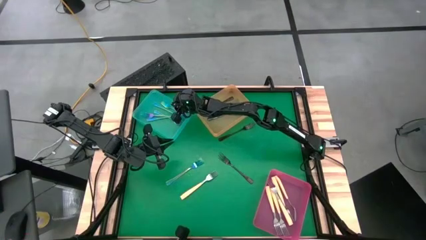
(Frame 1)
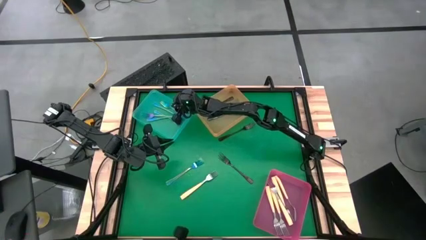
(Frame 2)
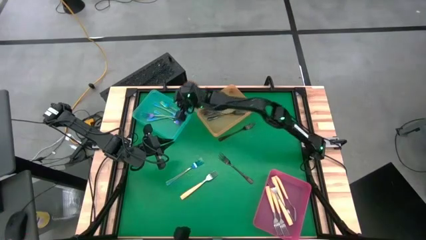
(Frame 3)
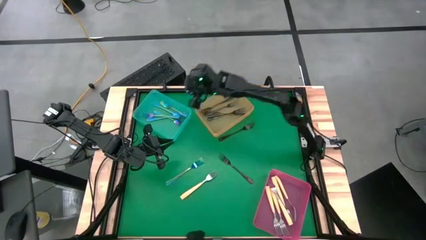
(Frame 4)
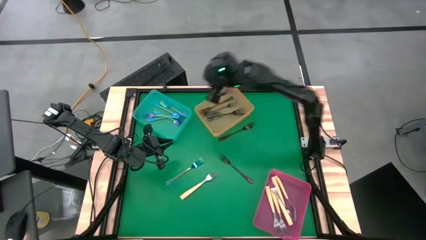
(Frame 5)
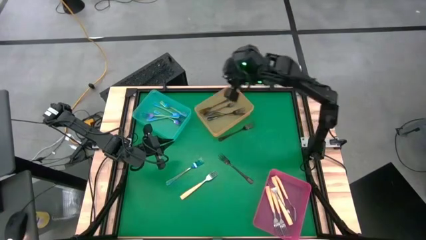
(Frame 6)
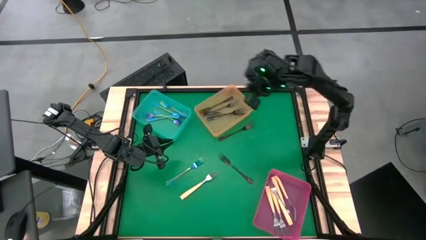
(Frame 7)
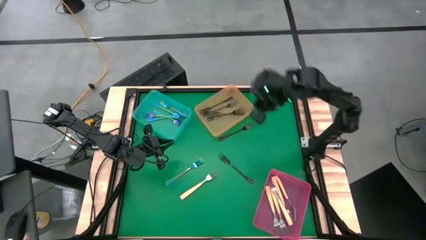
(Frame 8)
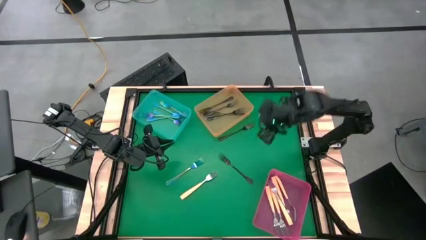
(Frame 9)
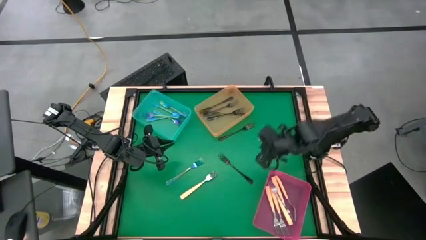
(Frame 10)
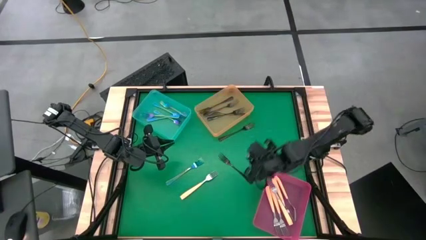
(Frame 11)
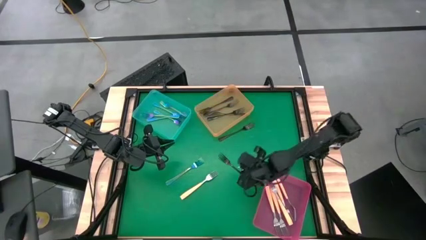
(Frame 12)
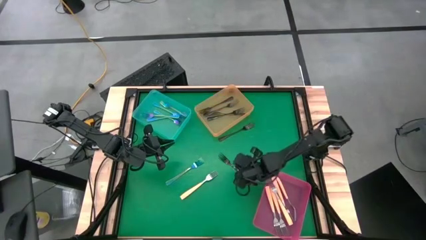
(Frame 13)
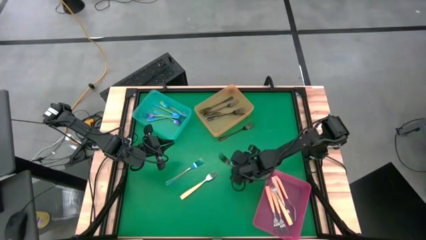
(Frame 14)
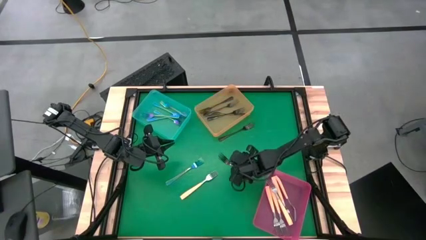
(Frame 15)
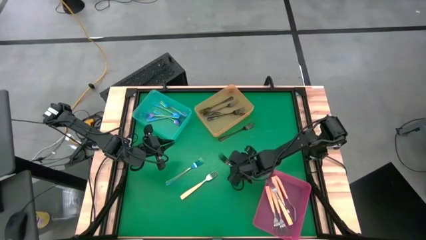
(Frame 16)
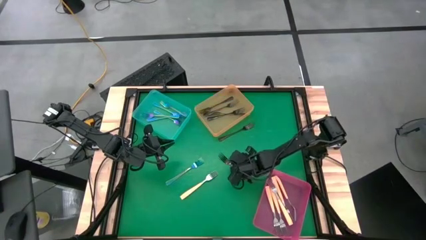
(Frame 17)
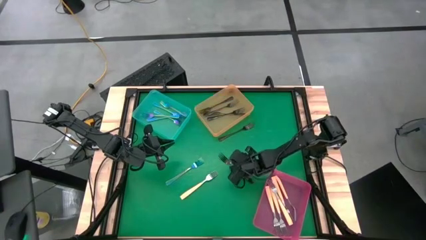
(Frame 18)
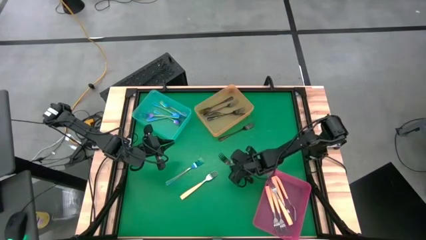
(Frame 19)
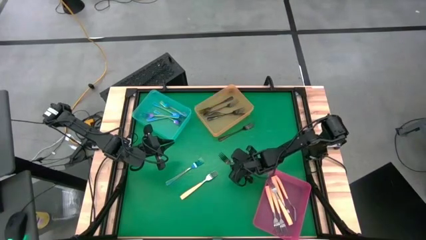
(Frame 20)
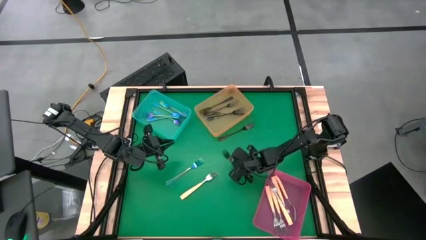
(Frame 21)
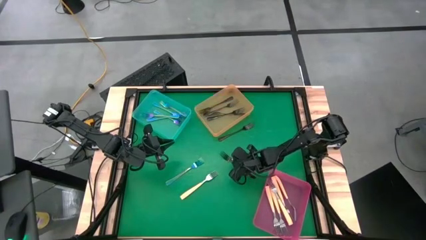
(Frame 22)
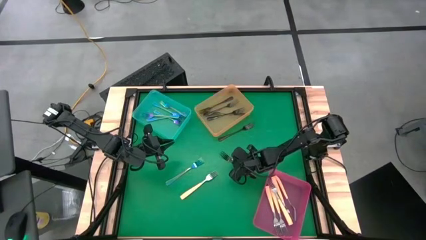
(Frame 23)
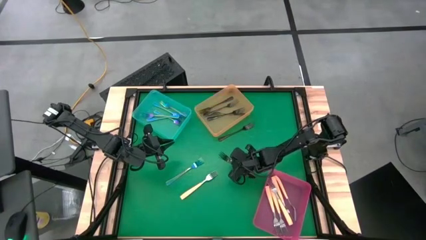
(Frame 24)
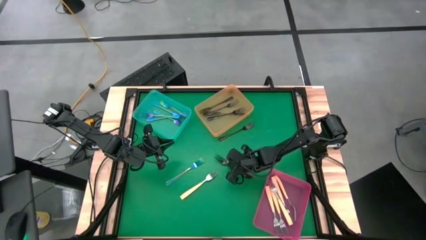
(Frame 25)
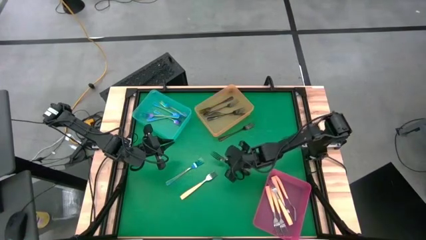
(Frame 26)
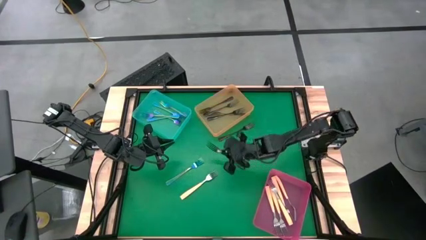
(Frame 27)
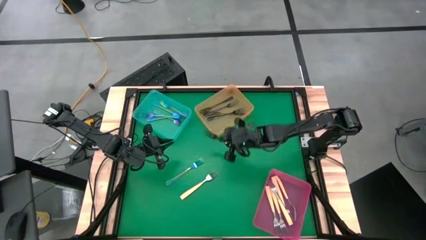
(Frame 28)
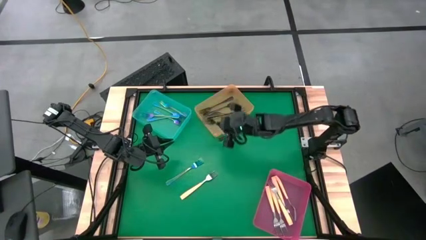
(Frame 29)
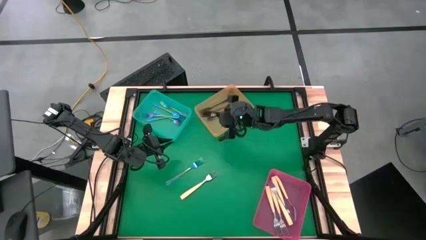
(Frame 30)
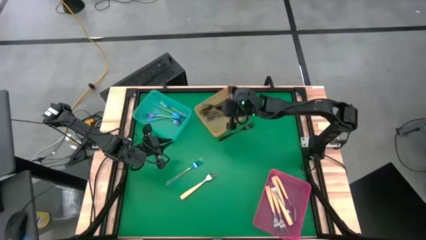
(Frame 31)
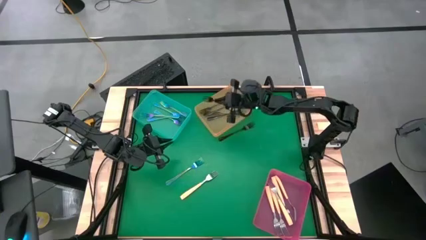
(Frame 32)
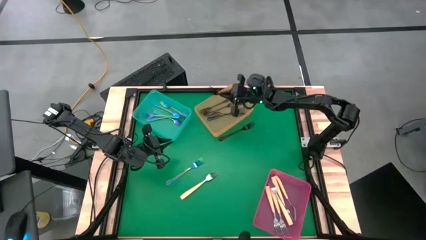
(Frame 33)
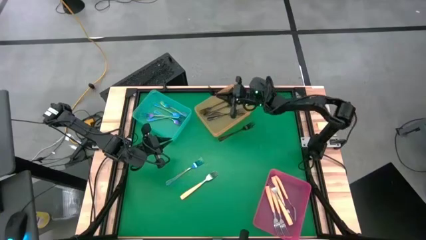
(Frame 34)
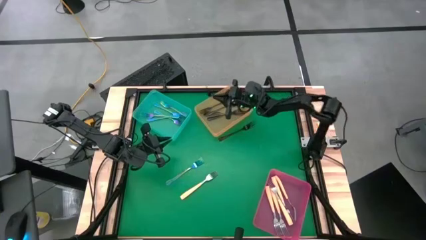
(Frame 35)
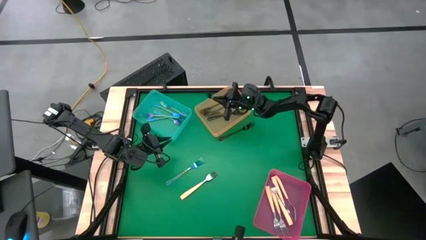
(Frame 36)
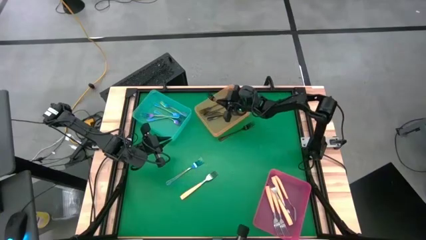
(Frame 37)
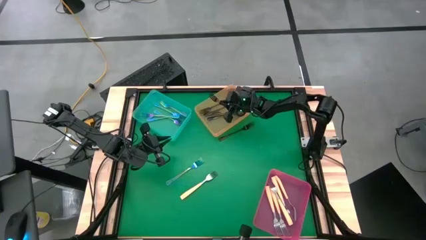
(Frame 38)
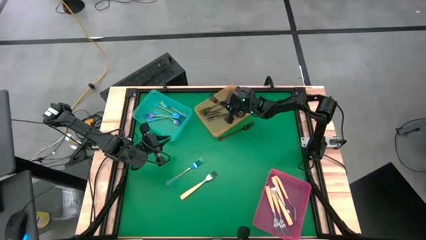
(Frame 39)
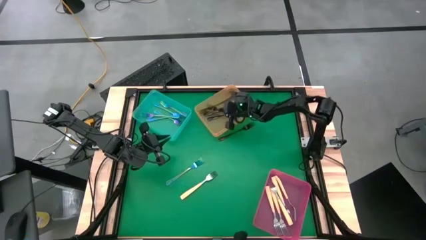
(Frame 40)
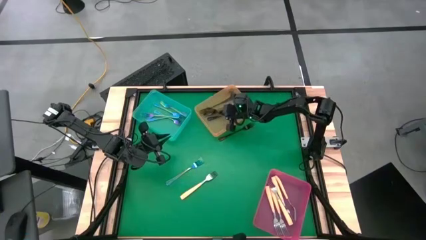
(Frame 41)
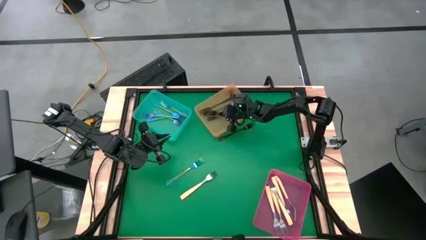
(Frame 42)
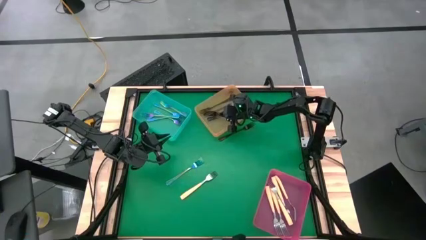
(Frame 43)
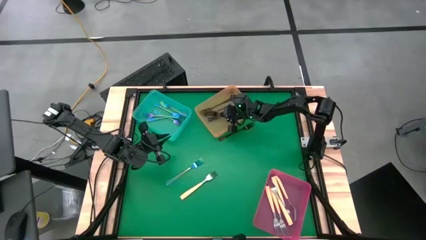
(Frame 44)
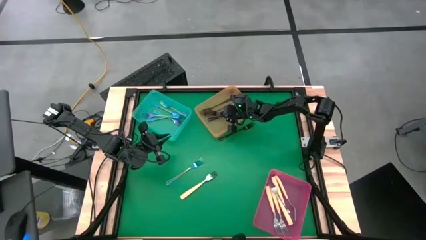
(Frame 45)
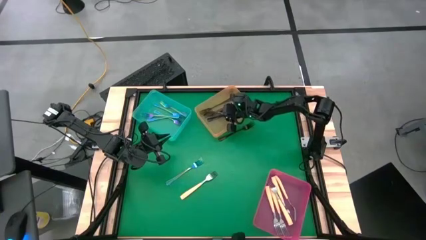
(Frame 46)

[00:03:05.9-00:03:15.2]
Task: Sort silverware by color (type)
Put the black fork into the yellow bin

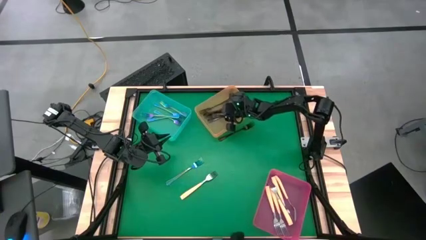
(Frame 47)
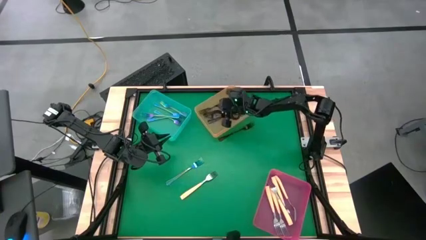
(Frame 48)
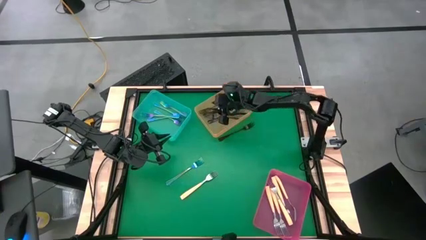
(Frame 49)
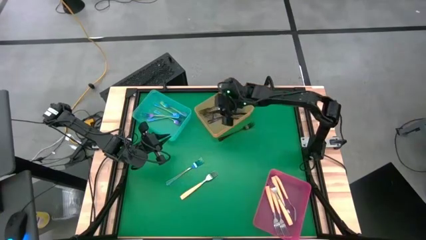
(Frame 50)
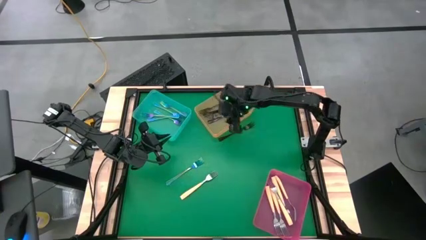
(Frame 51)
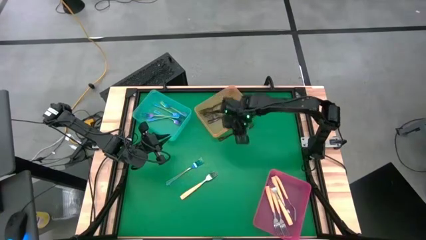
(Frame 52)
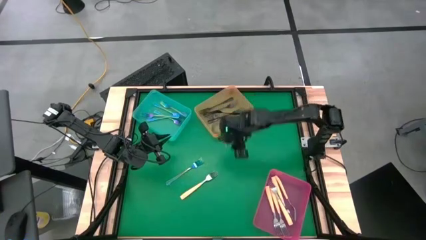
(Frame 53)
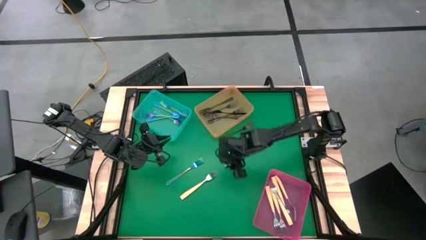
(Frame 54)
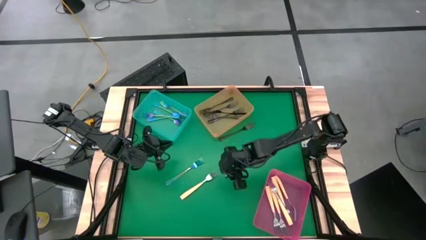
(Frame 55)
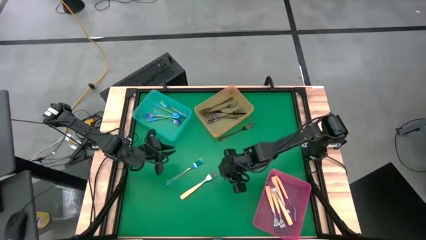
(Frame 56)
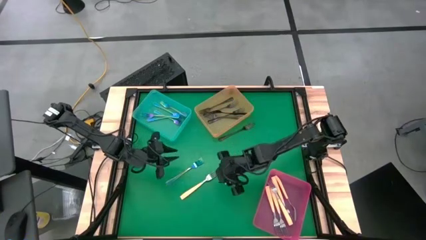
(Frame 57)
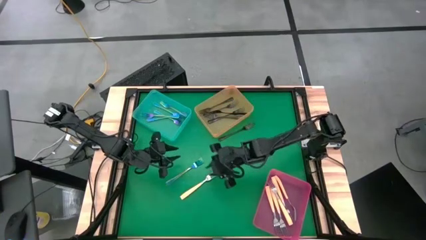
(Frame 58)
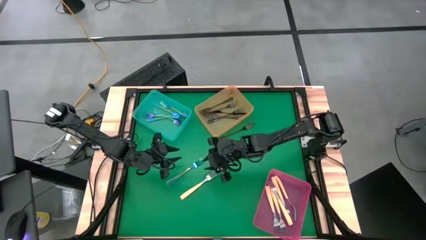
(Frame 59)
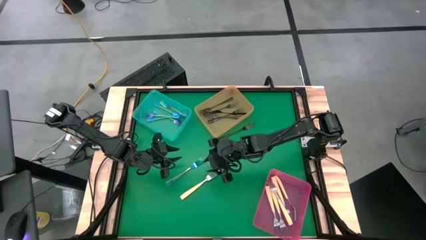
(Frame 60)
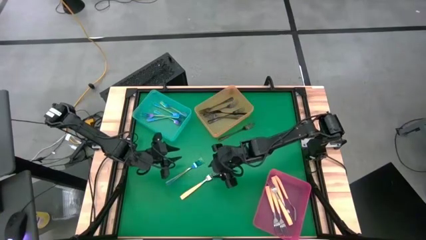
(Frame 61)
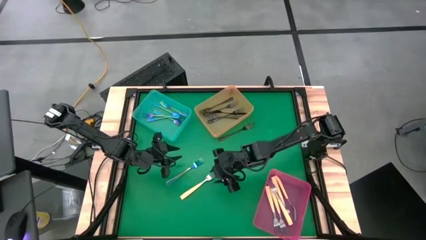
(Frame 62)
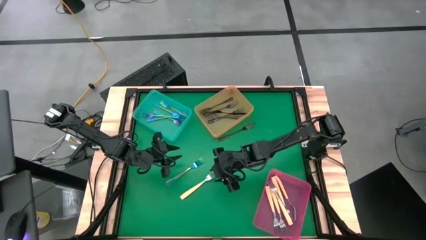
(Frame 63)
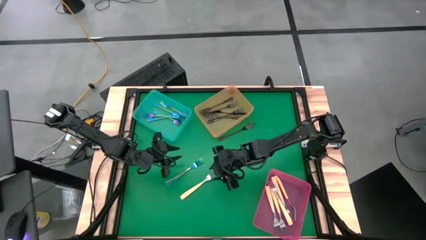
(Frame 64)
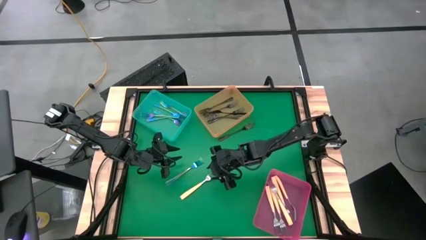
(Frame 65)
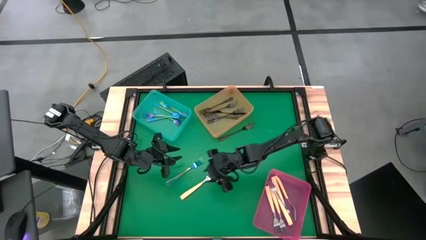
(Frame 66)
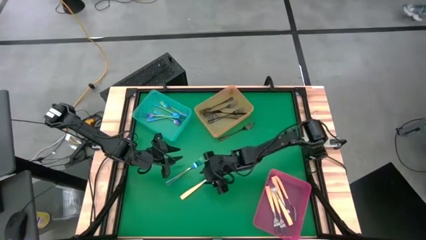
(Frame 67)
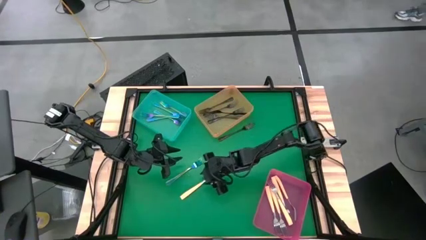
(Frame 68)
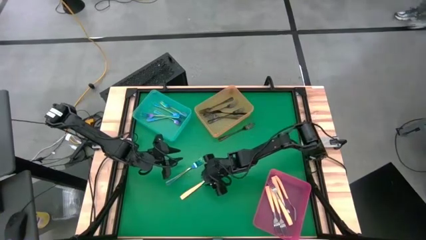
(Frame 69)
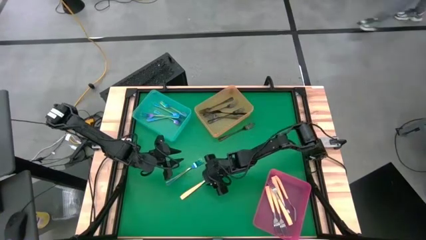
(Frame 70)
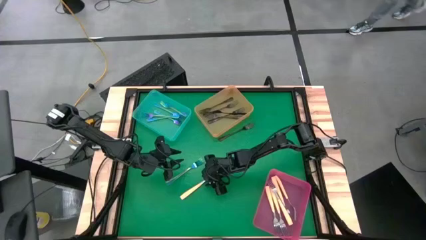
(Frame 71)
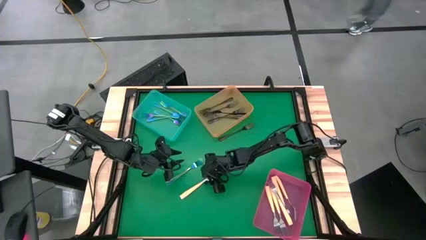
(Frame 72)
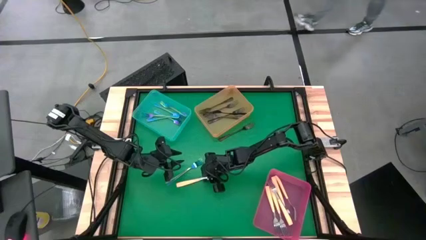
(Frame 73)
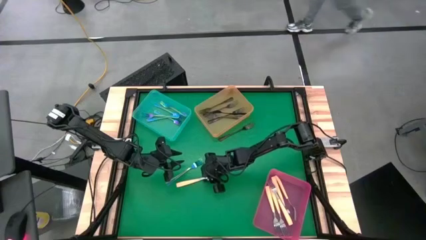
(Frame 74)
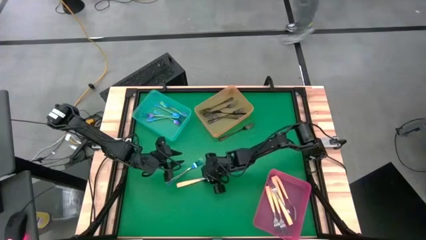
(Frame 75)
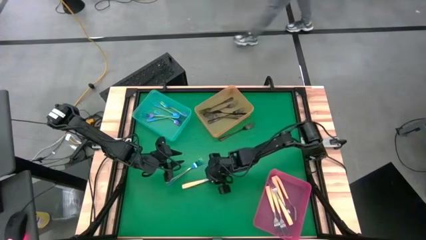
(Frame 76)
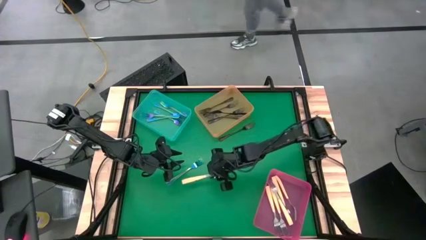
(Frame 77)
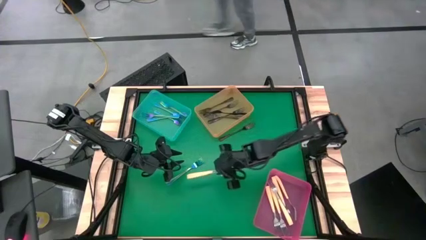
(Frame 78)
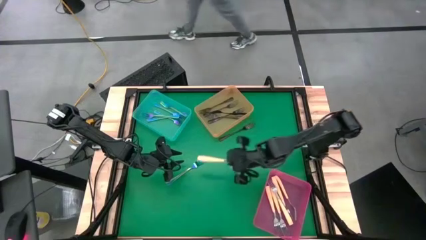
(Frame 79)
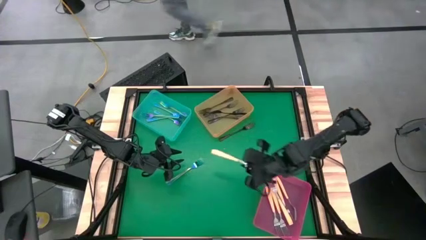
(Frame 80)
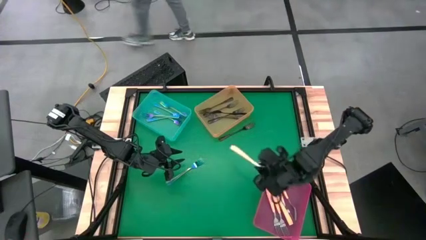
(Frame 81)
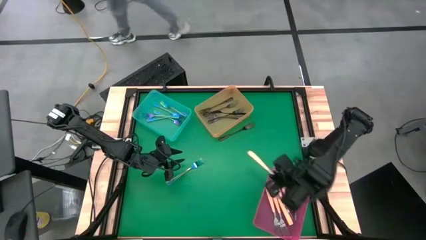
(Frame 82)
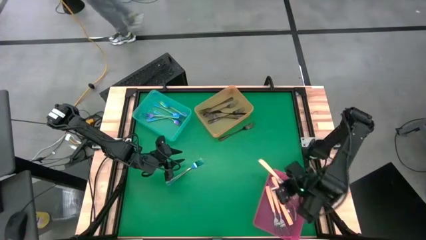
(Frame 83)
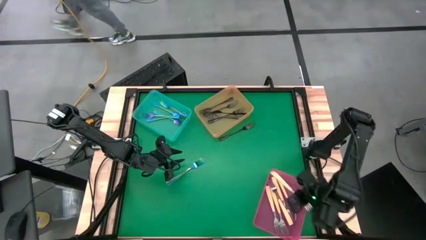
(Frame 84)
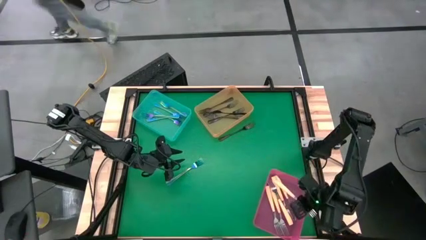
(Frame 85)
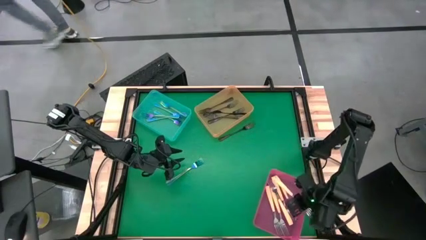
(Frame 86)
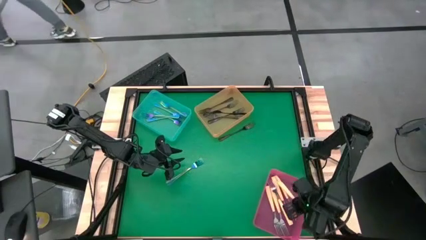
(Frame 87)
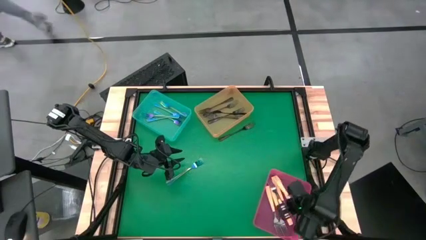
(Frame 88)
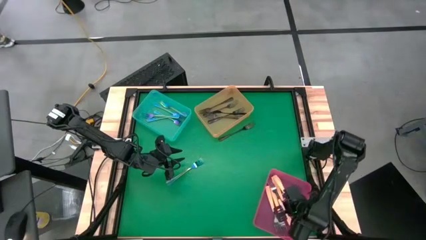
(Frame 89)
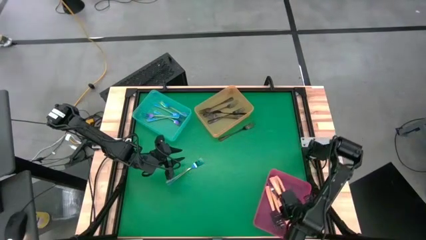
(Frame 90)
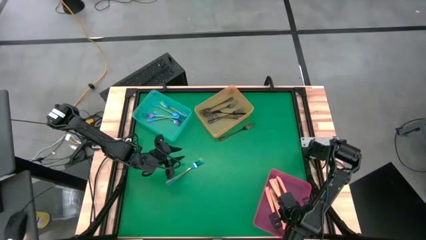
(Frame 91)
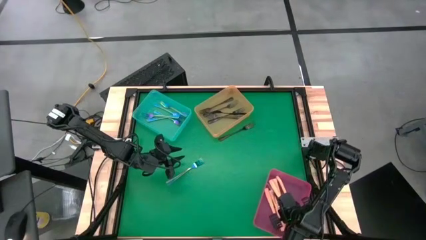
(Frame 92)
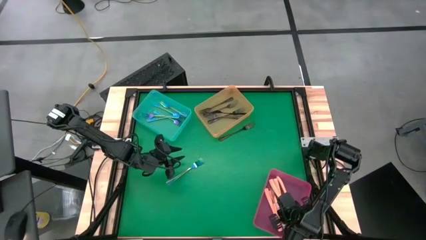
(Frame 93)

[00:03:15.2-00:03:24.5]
Put the yellow fork into the pink bin
